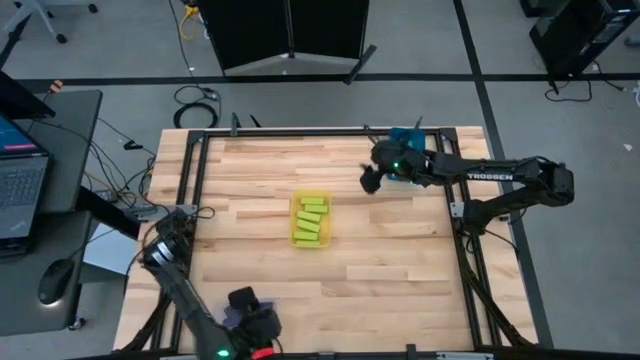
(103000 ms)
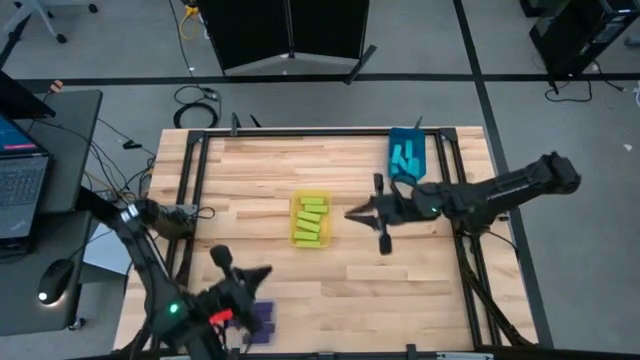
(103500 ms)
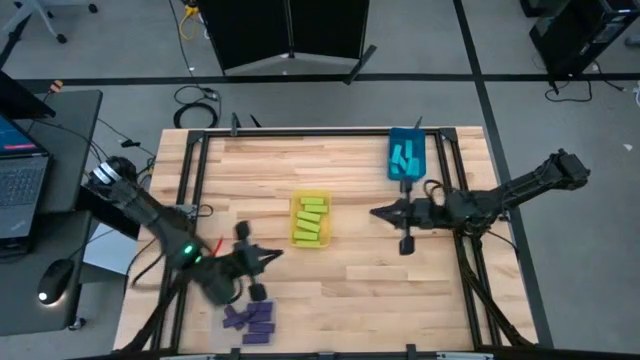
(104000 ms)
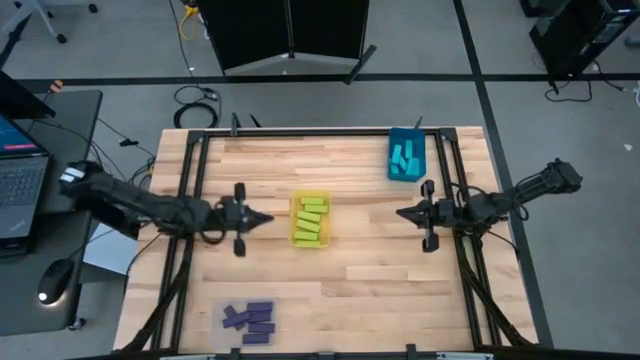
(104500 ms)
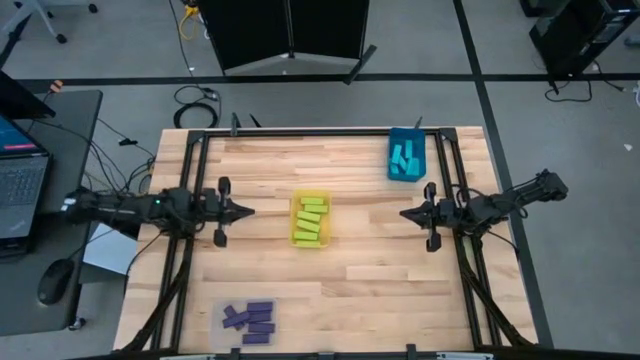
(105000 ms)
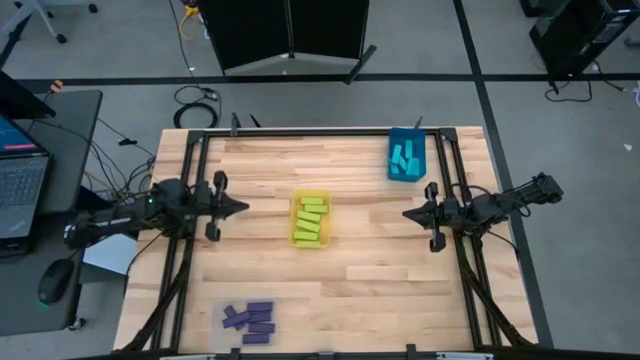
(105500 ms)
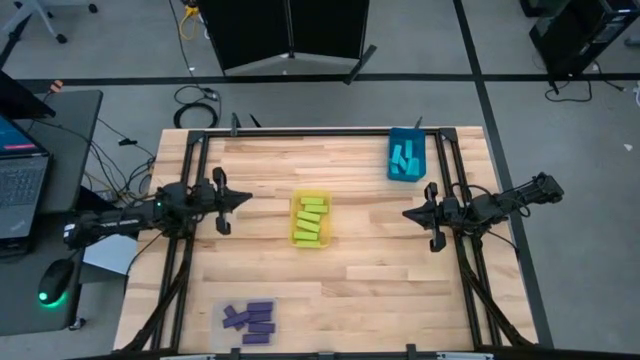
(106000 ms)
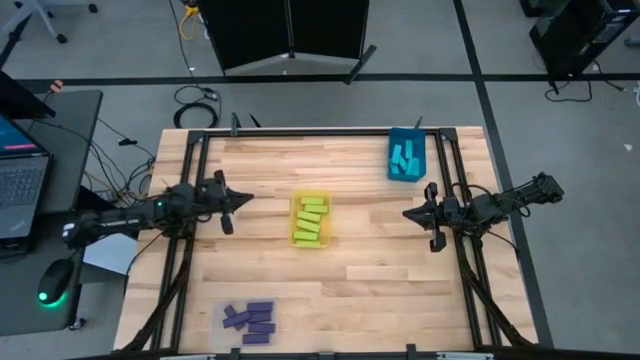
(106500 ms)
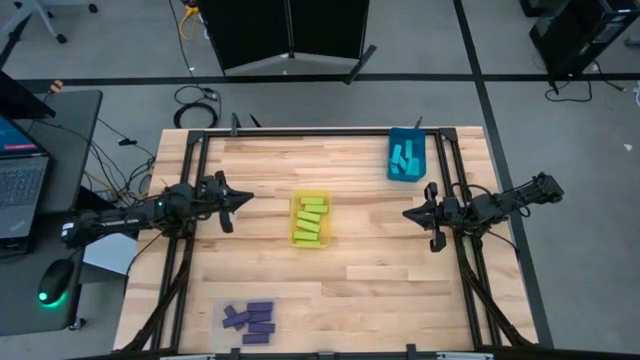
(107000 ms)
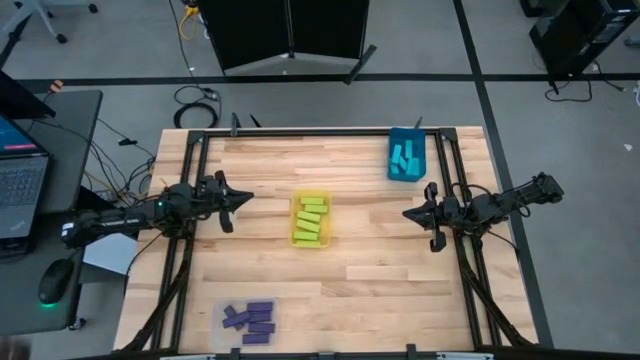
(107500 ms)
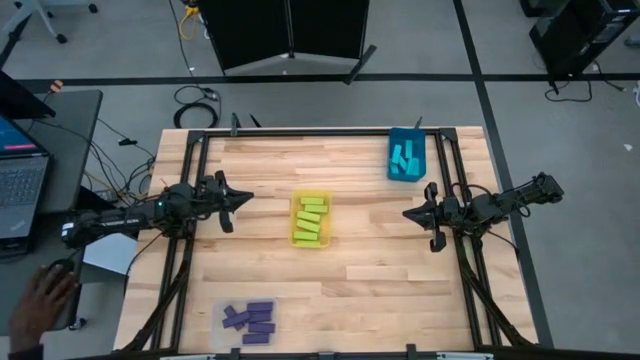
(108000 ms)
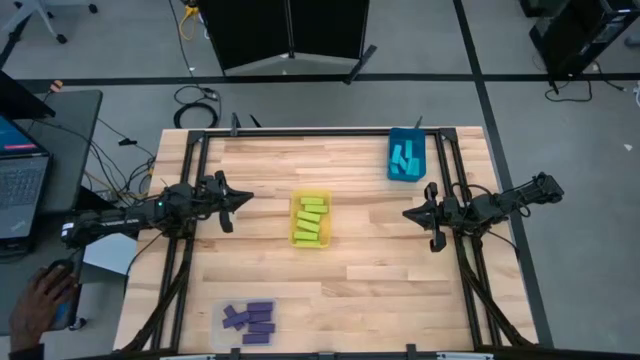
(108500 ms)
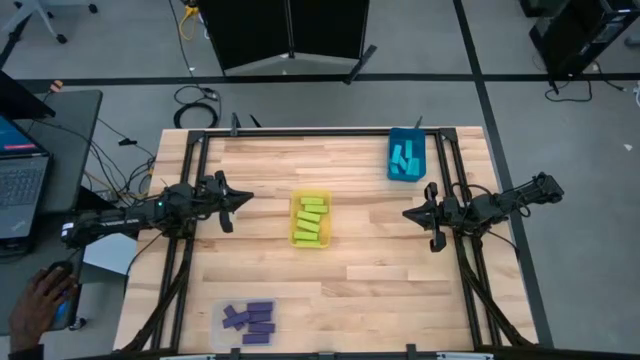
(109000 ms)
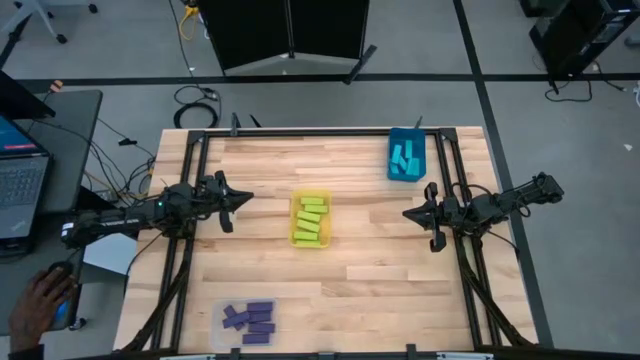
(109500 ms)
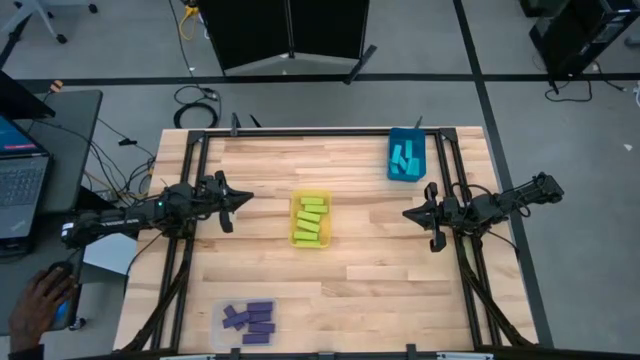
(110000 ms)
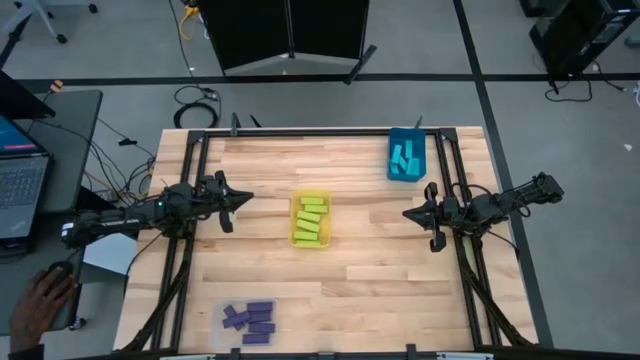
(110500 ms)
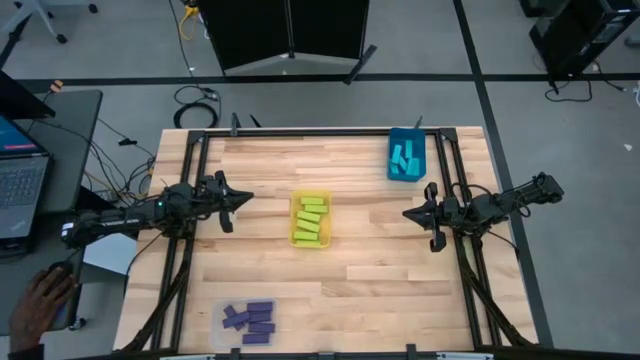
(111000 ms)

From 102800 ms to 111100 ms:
Task: Sort blocks
Return to Home Position

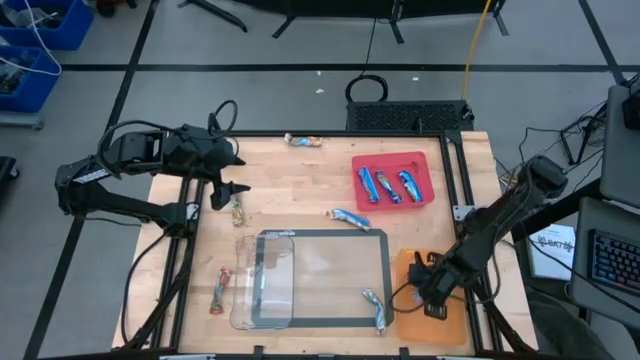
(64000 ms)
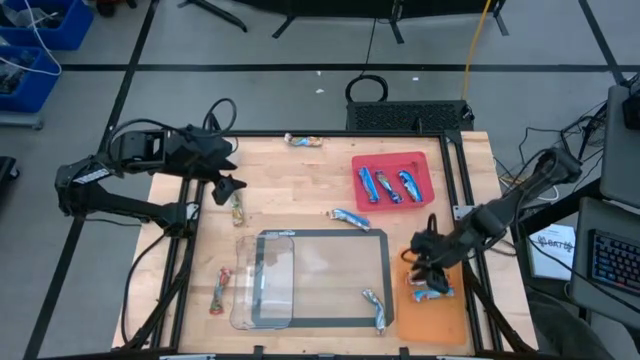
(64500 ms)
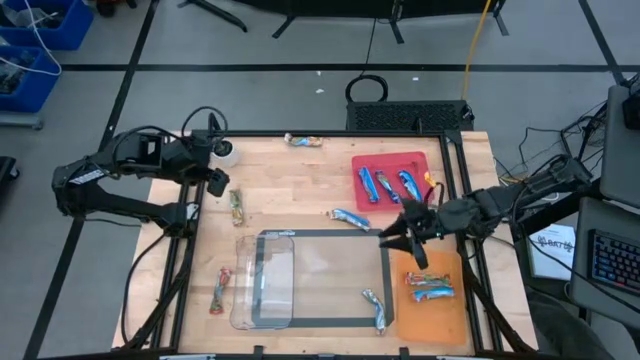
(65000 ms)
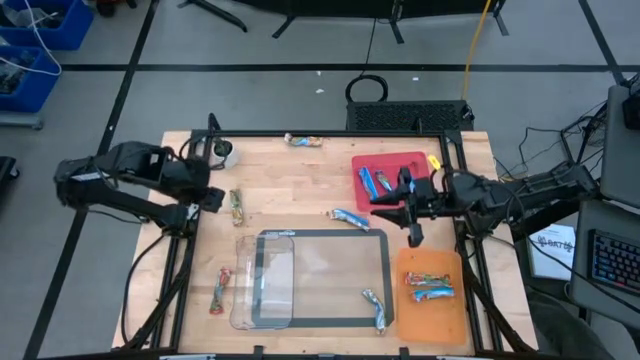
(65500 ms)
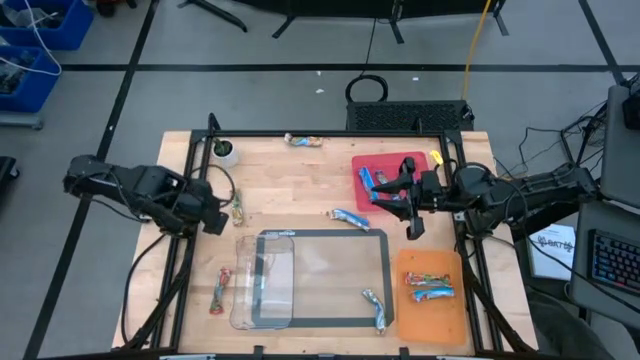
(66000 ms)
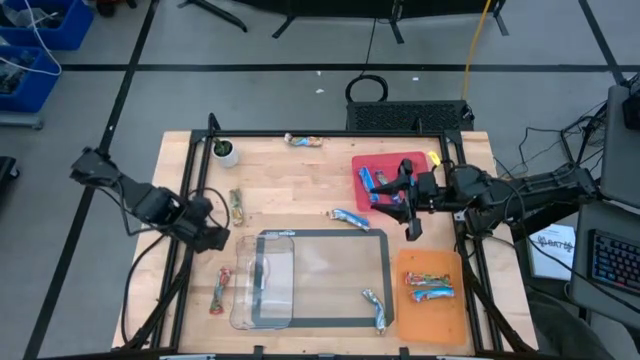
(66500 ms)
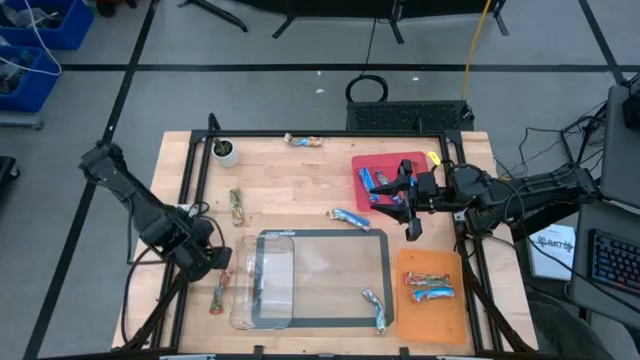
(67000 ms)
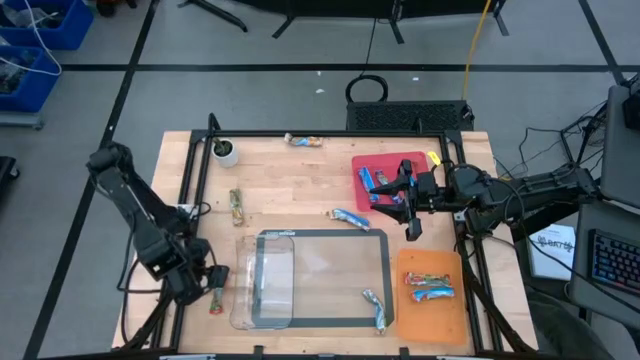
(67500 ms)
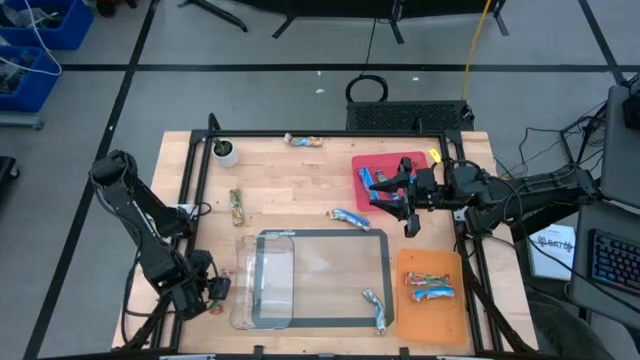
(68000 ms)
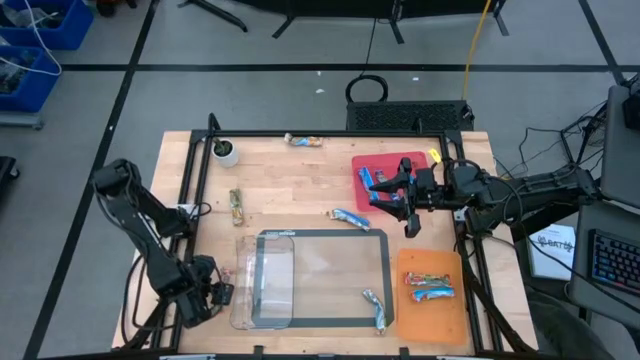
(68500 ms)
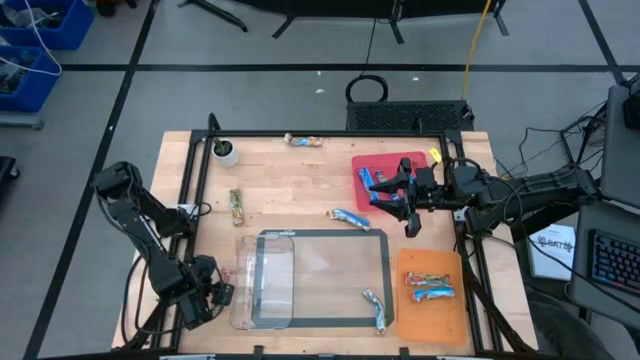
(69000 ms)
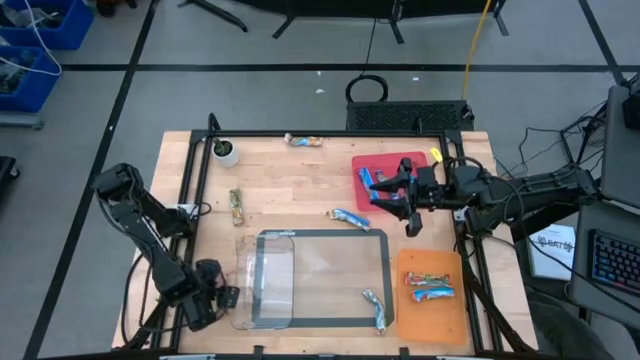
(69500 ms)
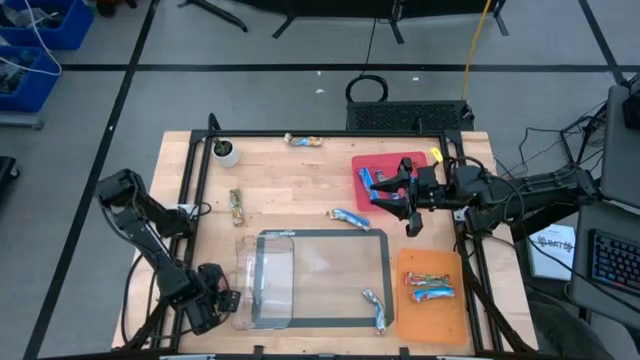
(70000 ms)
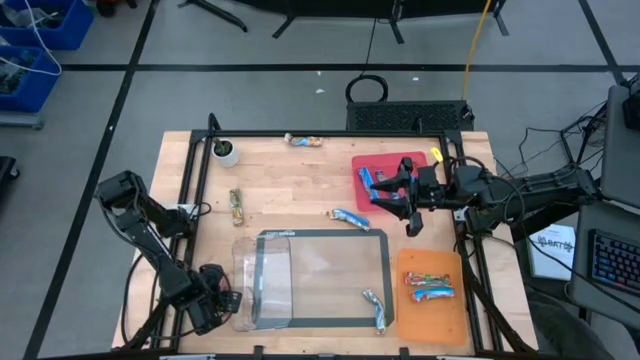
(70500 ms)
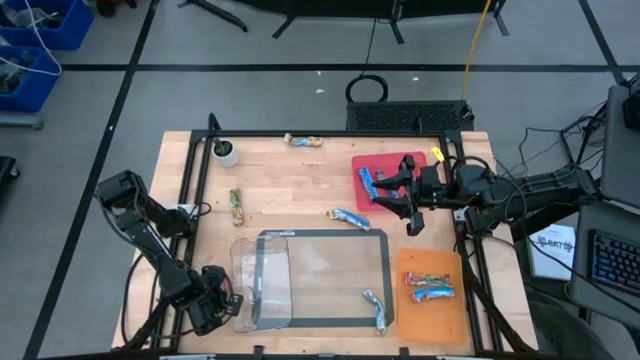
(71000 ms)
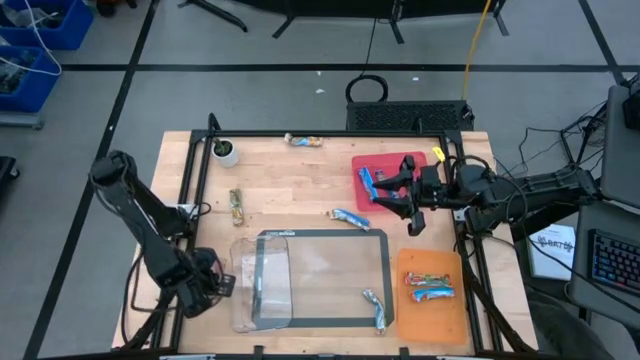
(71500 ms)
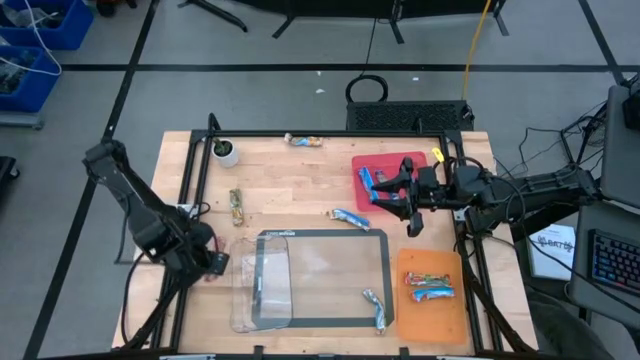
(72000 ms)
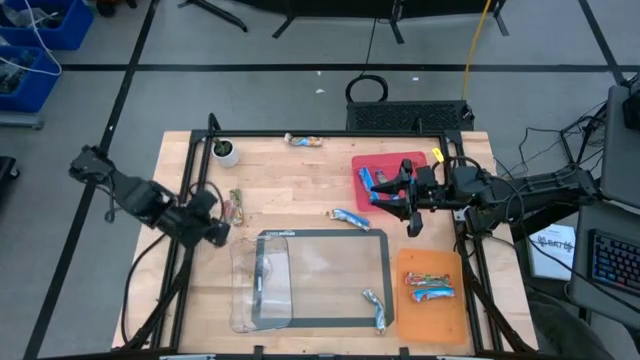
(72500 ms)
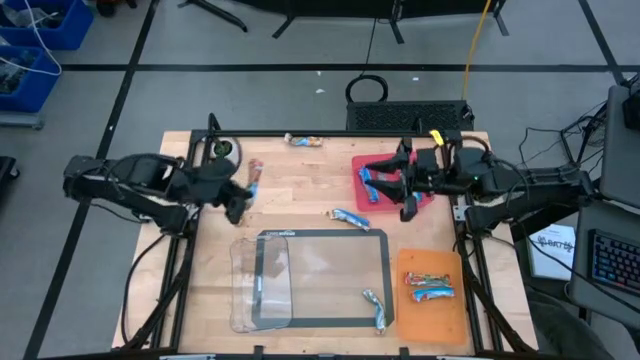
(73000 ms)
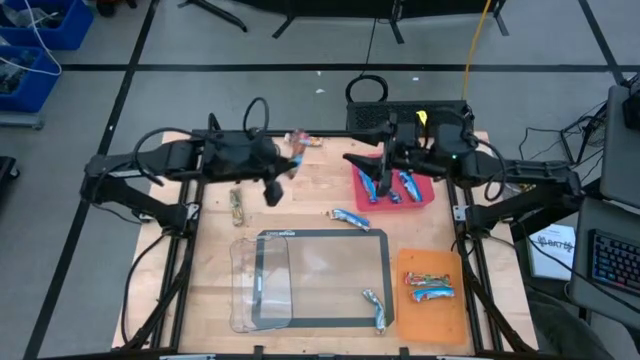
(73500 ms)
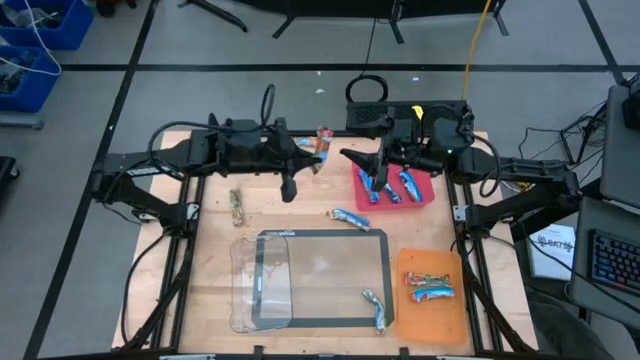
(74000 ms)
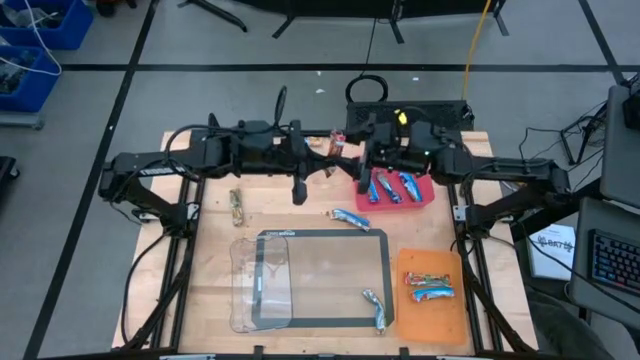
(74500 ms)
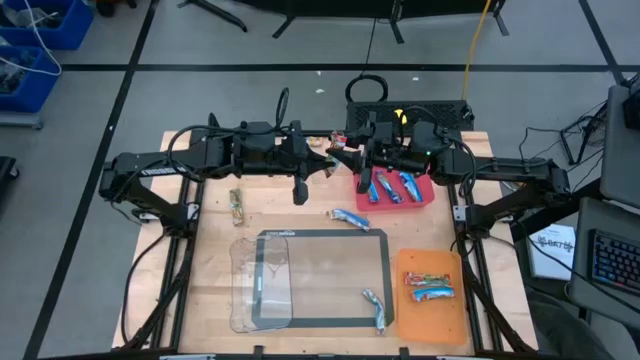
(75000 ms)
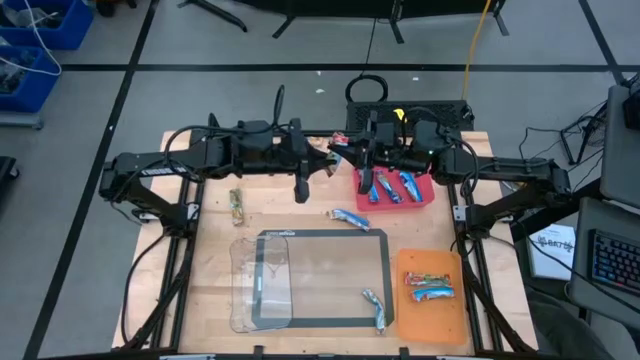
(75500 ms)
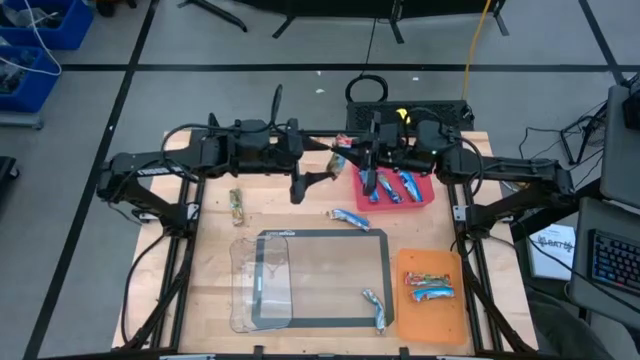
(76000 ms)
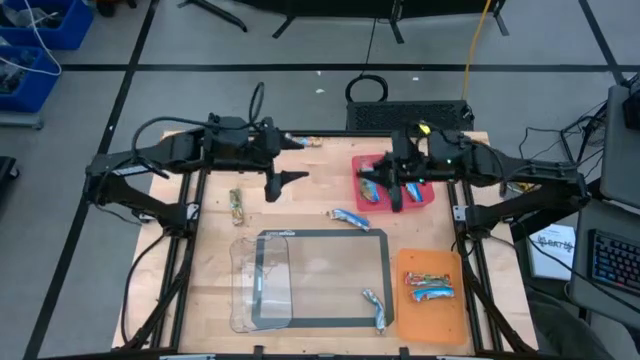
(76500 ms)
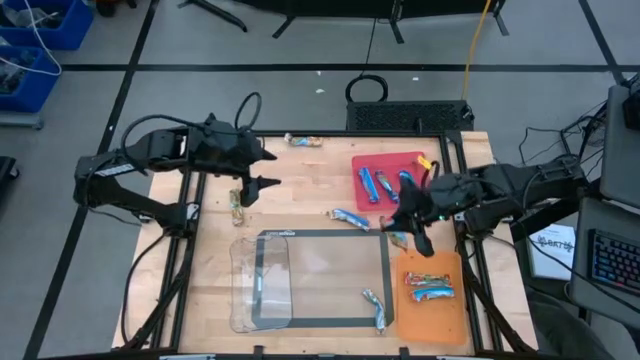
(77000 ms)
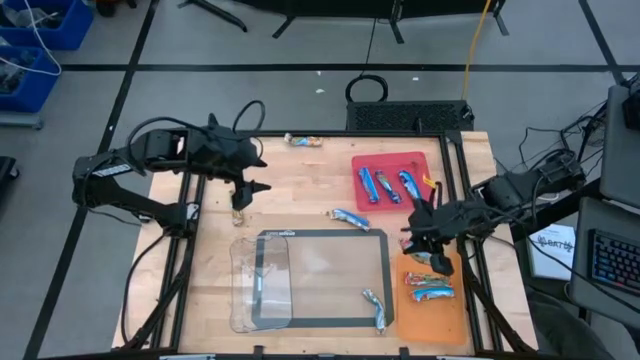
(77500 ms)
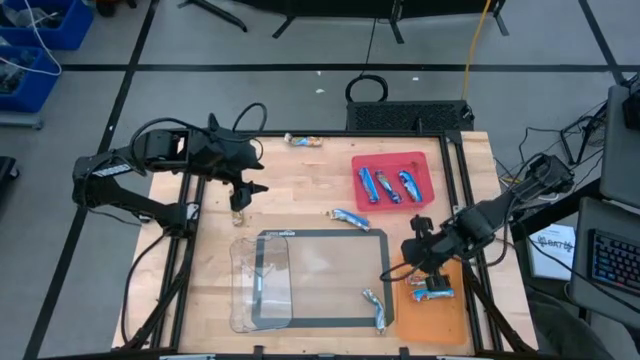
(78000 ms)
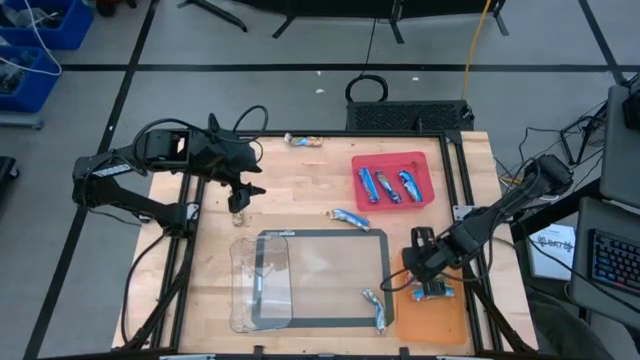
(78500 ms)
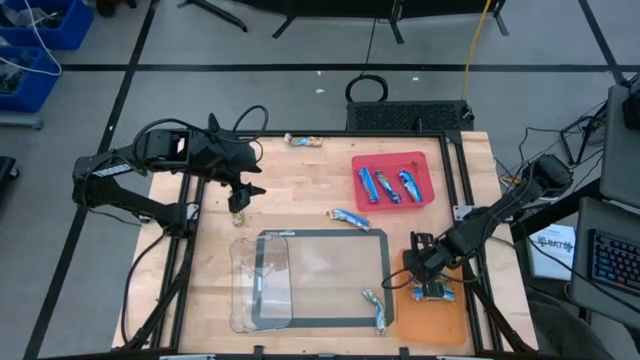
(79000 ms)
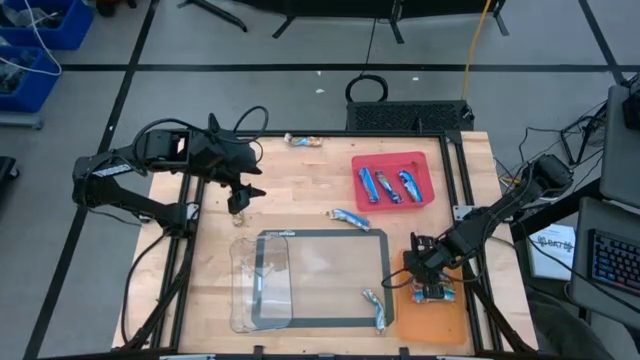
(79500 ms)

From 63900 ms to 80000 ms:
Task: Pick and place Granola Bars by type
Put the red granola bar into the orange bin
